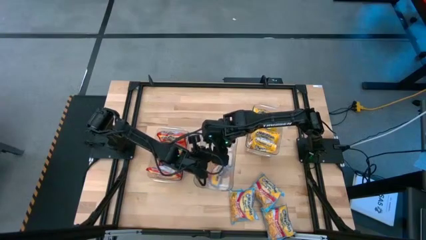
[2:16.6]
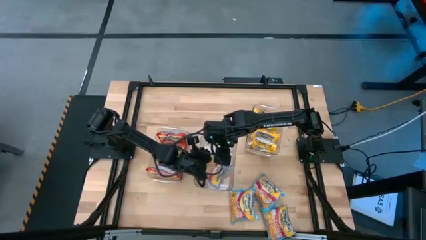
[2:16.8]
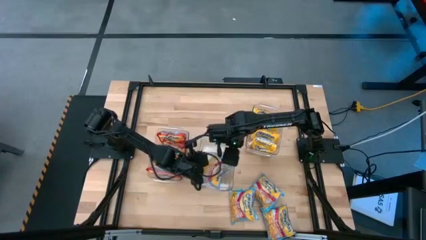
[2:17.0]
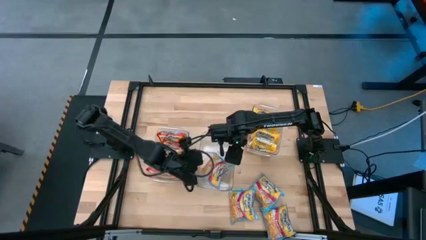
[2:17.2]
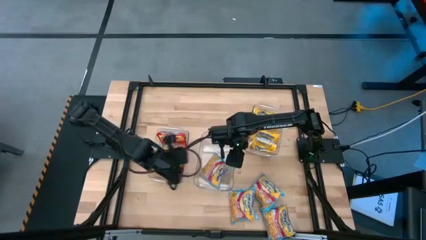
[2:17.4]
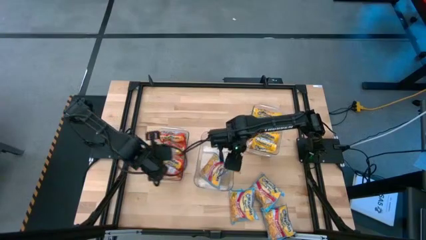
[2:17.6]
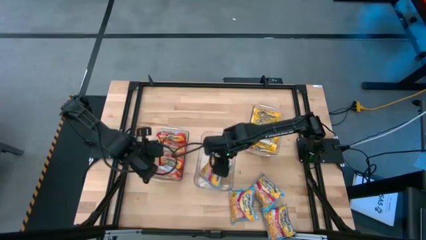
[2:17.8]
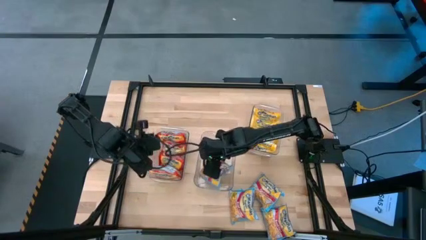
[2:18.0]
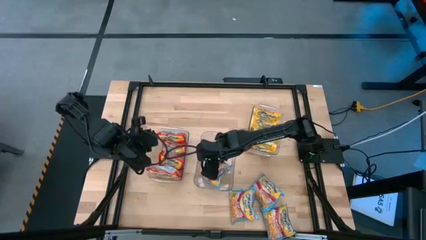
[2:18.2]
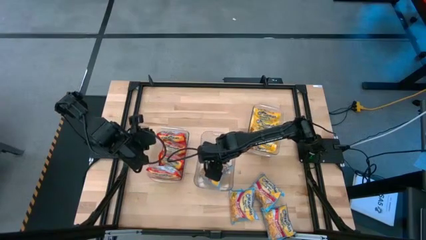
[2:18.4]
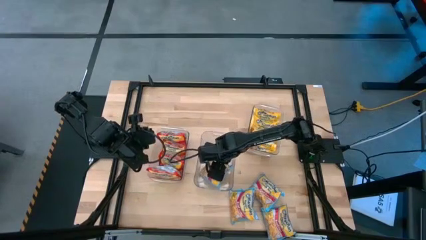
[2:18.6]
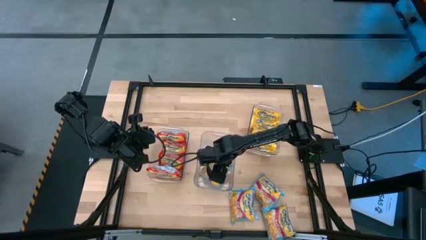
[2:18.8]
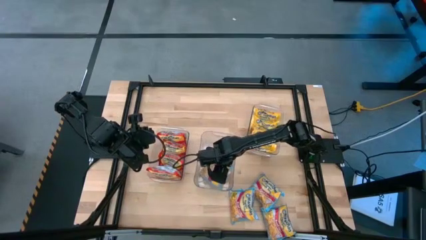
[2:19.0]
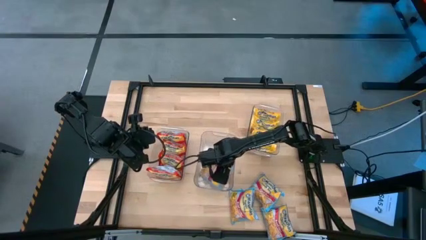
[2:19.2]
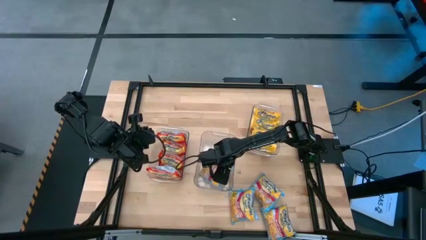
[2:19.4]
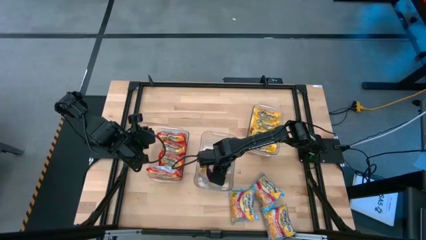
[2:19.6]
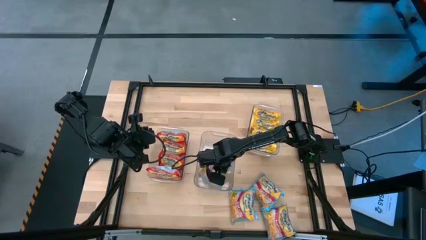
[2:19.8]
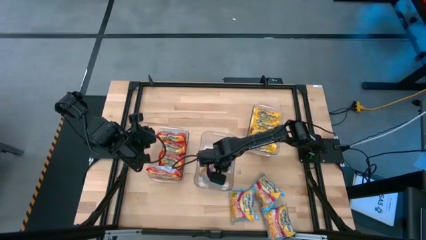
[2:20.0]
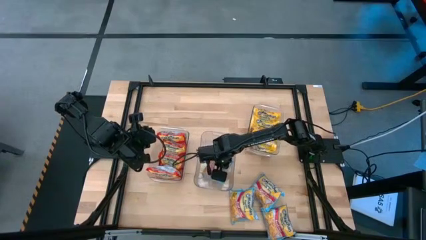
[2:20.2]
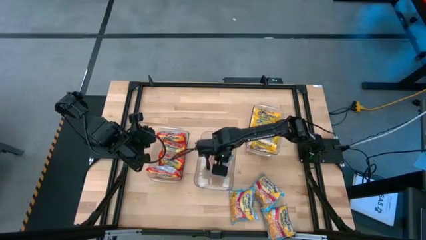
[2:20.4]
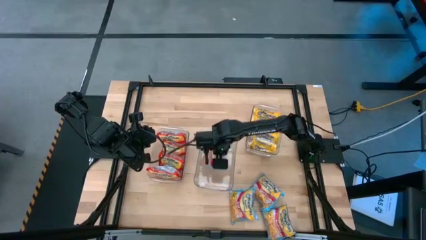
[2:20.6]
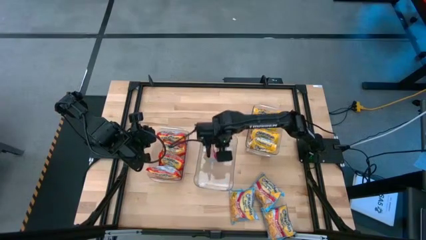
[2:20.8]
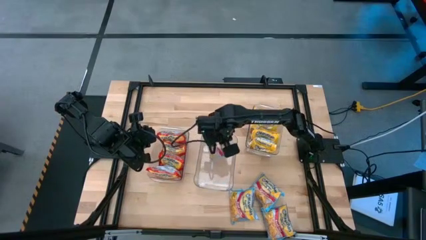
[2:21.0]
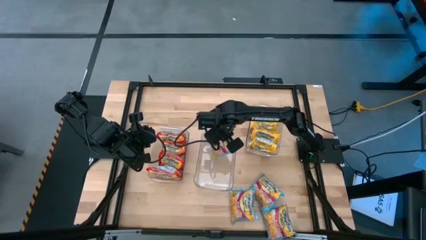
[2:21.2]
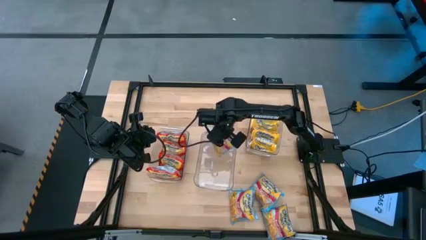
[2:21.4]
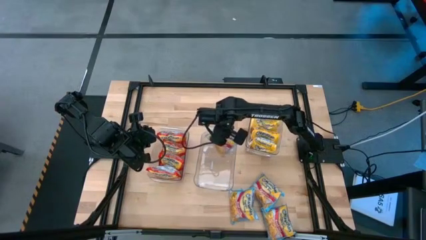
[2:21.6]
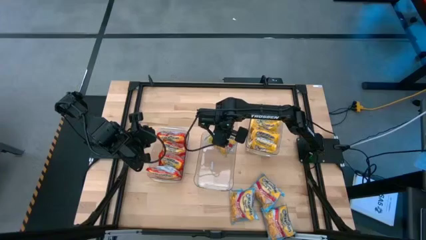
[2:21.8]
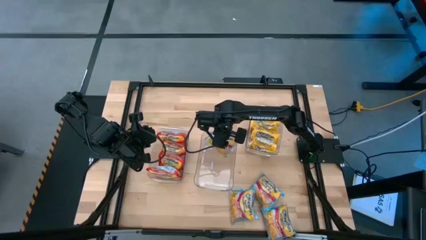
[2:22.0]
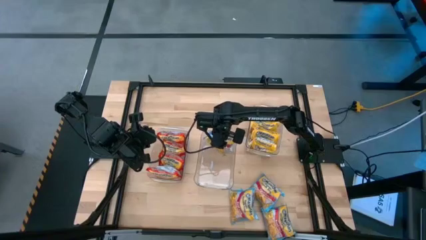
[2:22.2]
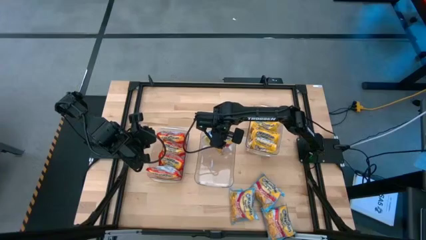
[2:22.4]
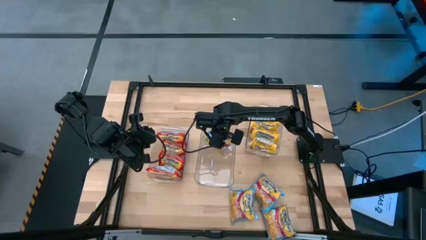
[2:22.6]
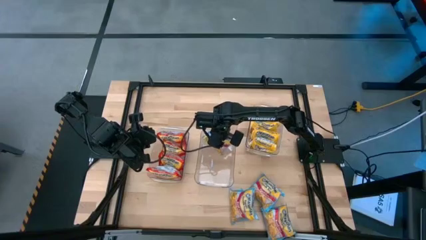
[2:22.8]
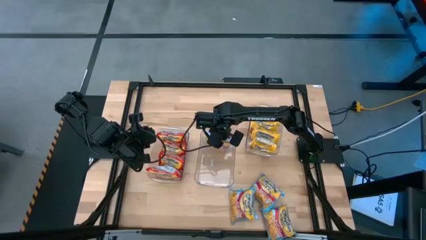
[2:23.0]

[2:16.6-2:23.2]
Task: Sort Maruchan noodles
Put the blue noodle pack into the middle transparent bin

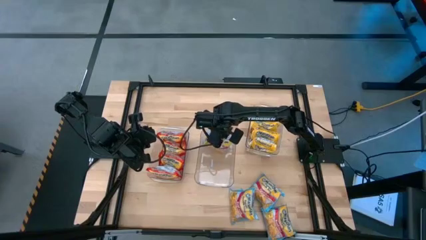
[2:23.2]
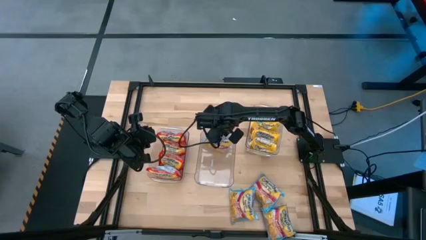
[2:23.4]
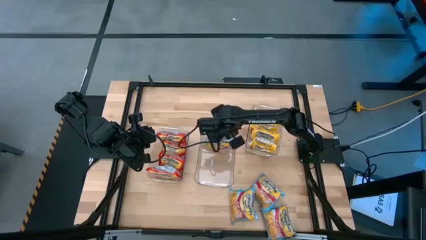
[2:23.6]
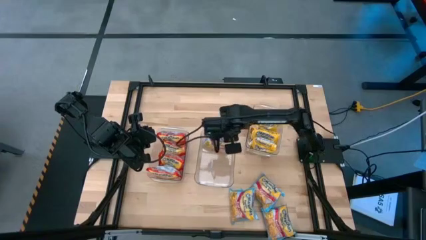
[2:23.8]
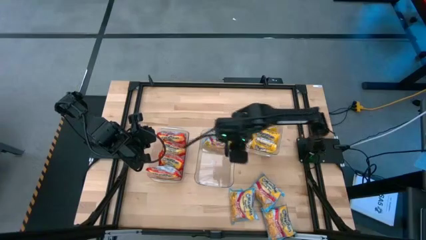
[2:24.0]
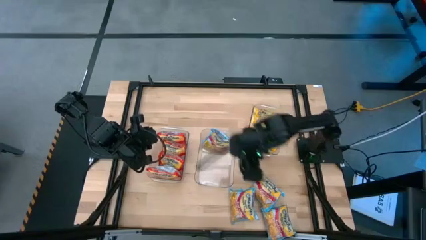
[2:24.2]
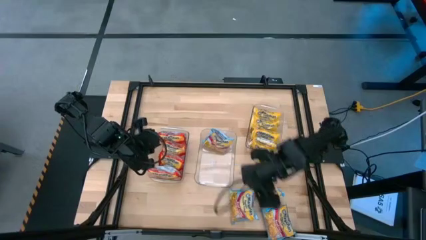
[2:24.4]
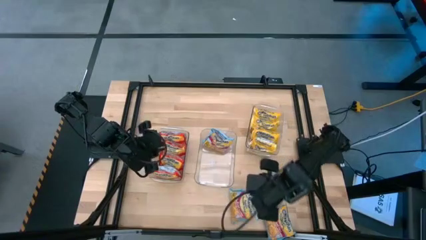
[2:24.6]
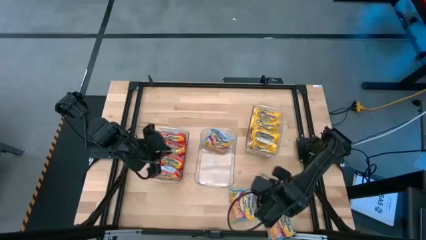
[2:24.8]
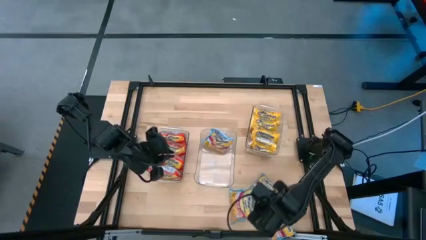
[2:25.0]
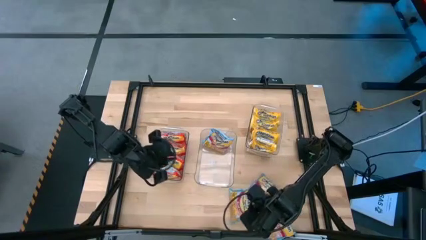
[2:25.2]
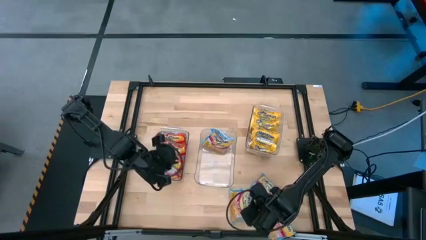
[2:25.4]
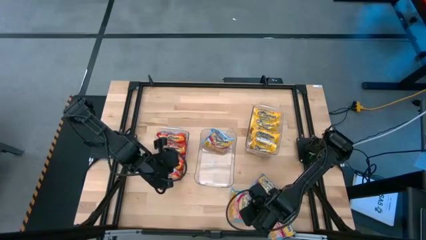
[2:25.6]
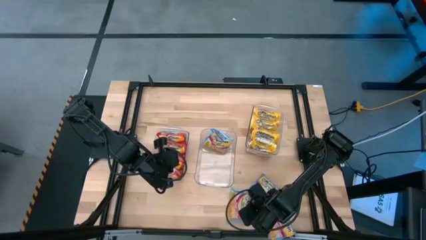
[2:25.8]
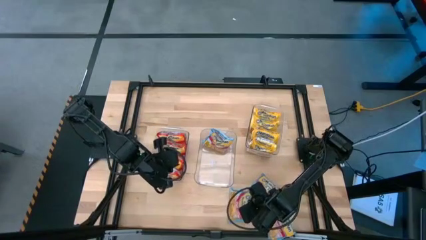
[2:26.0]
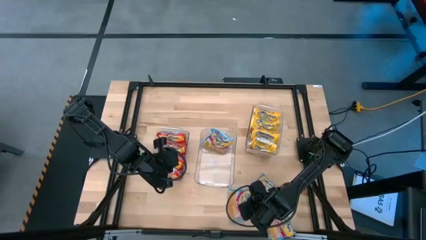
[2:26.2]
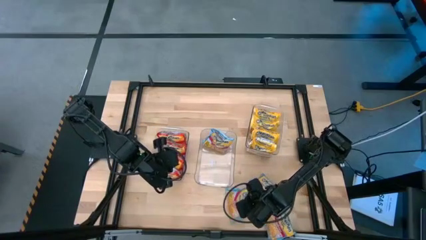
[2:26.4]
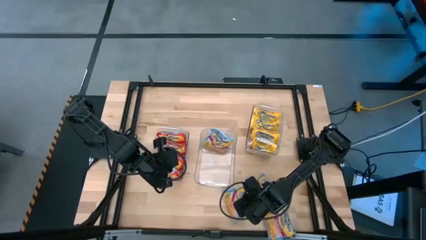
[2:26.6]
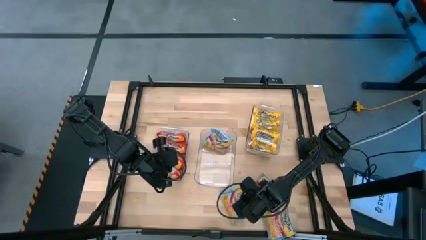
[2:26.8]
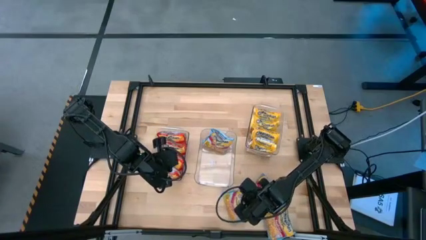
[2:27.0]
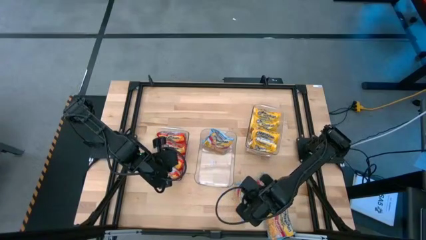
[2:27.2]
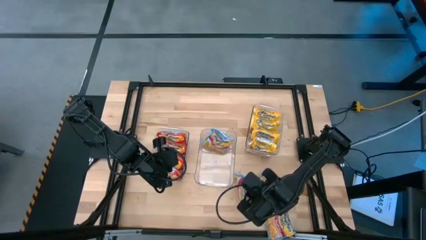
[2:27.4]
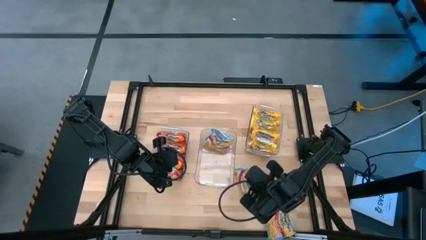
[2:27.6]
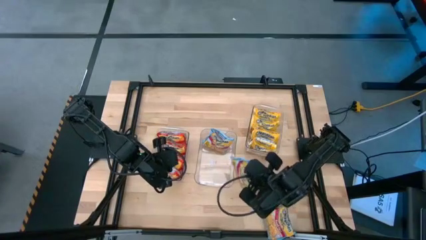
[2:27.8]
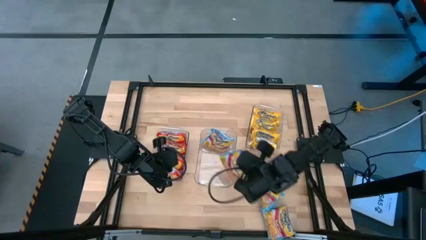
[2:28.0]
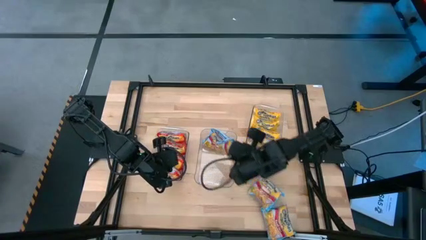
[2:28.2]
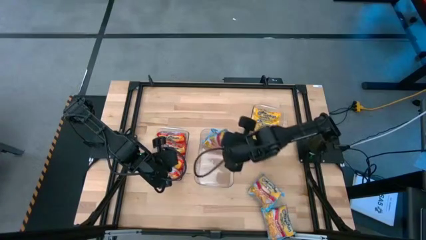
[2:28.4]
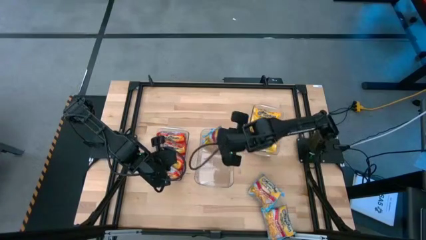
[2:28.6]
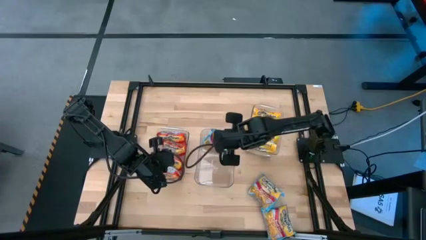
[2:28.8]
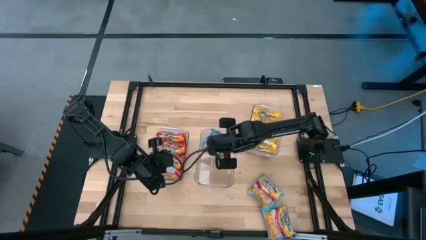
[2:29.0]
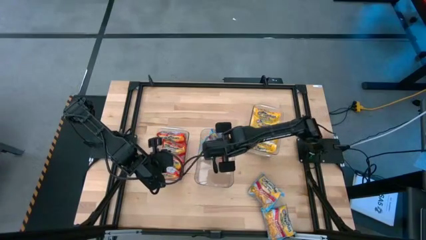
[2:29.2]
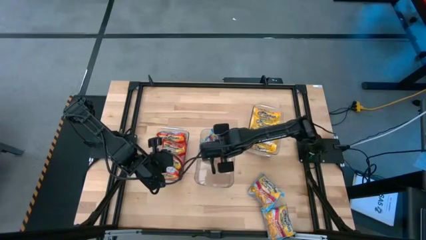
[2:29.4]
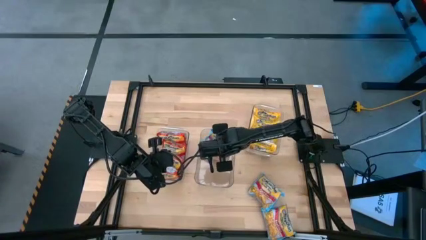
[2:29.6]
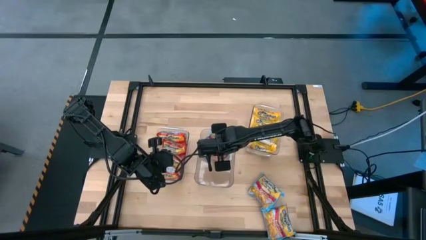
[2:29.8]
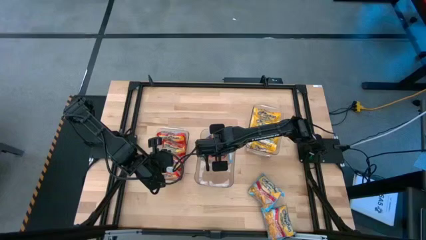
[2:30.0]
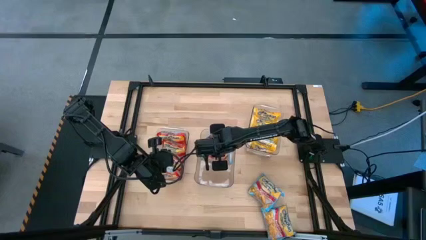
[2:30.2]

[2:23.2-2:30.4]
Put the blue noodle pack into the middle transparent bin

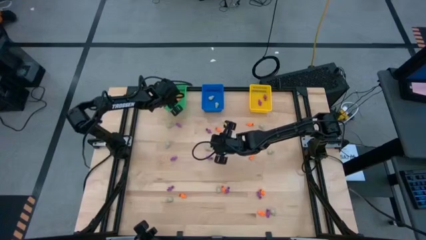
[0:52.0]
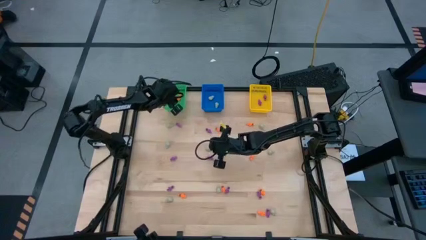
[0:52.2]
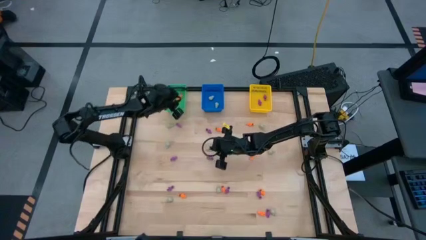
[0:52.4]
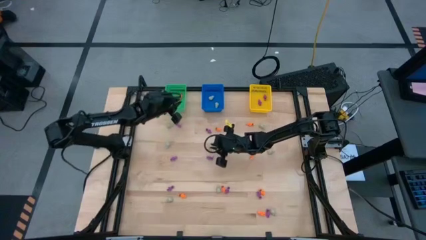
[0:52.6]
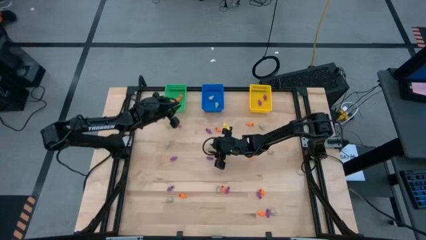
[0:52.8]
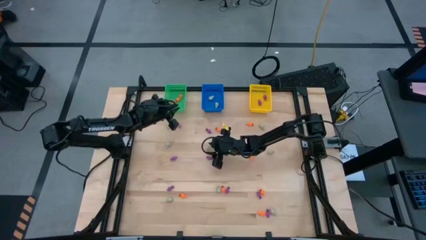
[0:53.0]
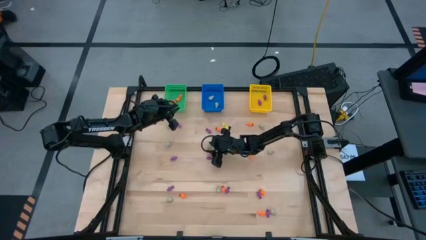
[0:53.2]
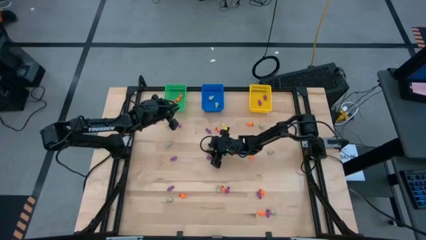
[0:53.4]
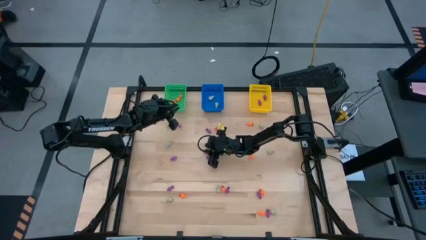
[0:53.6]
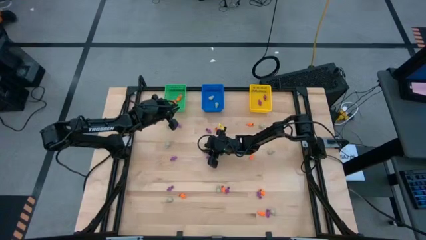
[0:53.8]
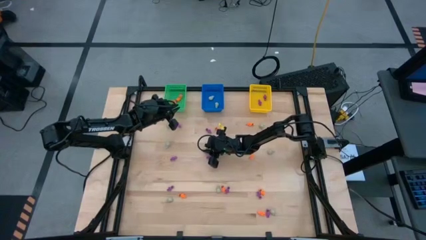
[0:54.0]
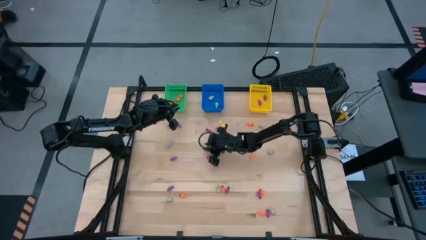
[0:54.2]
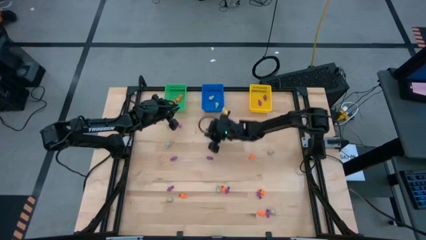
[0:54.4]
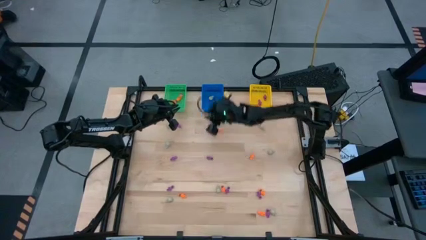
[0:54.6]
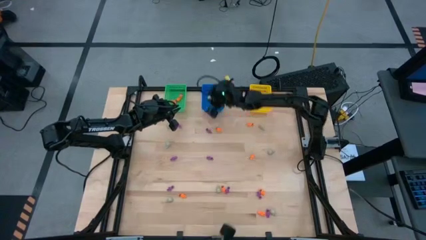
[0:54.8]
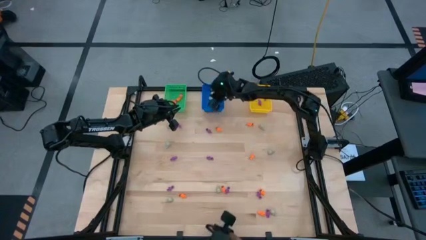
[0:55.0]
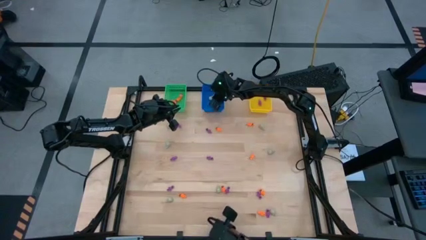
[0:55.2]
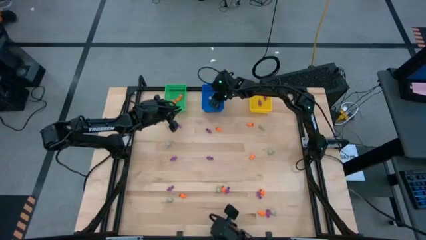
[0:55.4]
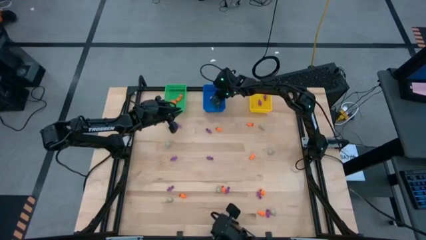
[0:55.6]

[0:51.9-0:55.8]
Task: Sort Halloween decoration
Put the white skull toy into the blue bin
